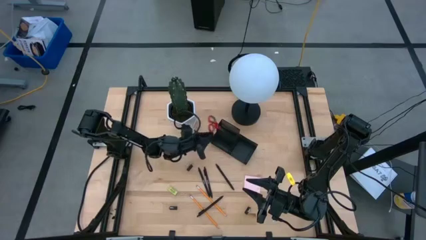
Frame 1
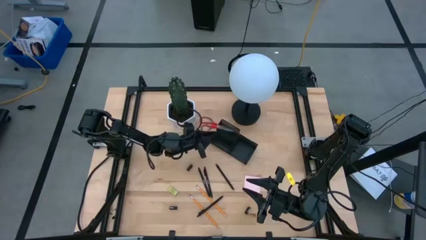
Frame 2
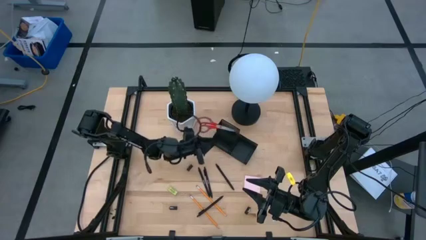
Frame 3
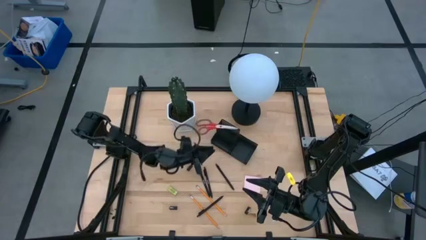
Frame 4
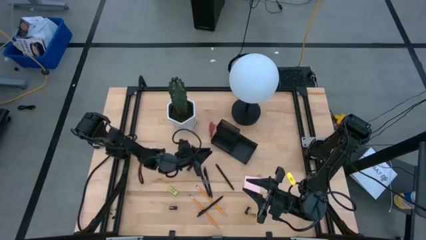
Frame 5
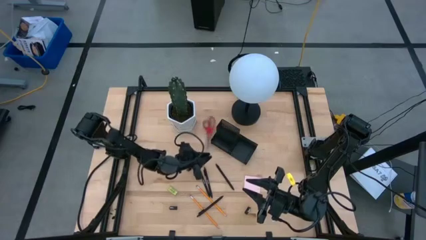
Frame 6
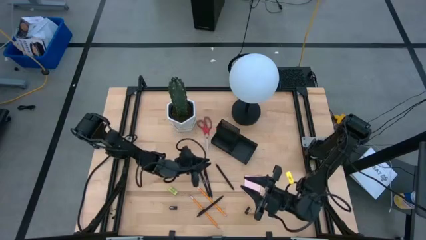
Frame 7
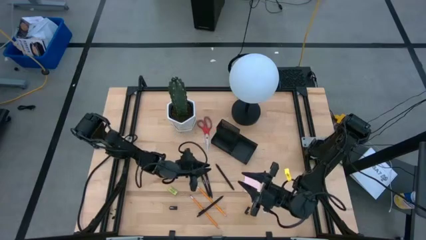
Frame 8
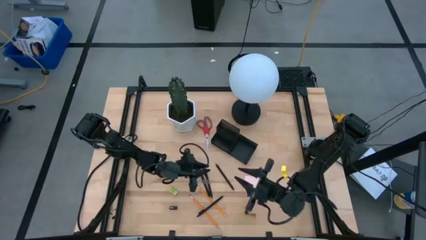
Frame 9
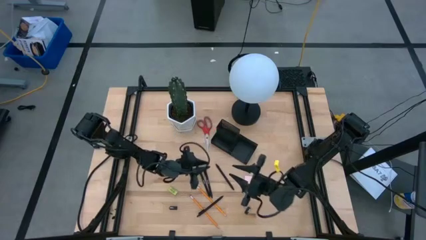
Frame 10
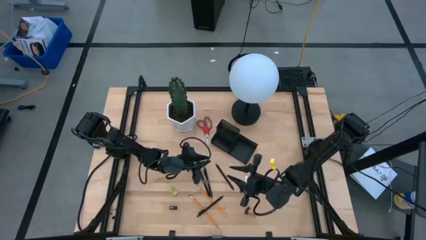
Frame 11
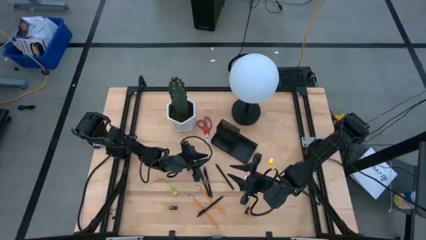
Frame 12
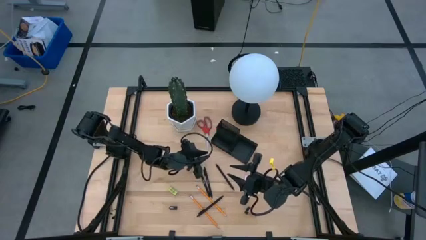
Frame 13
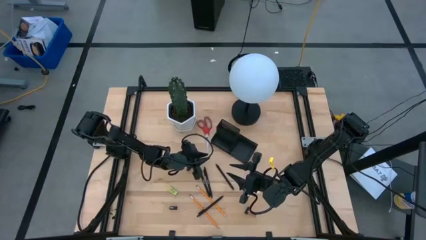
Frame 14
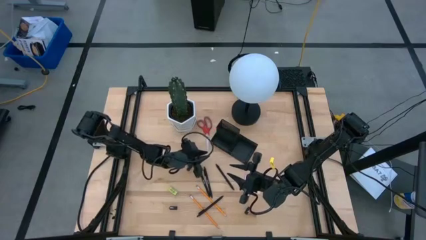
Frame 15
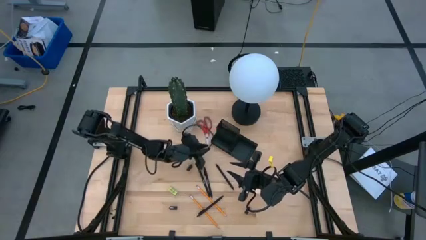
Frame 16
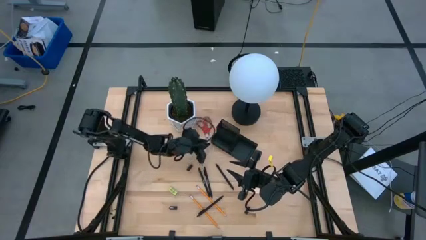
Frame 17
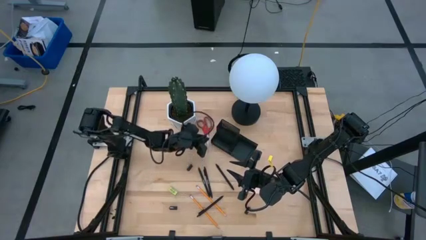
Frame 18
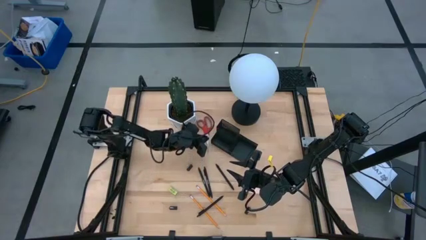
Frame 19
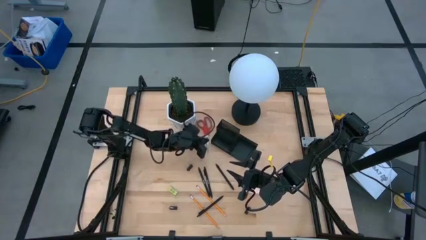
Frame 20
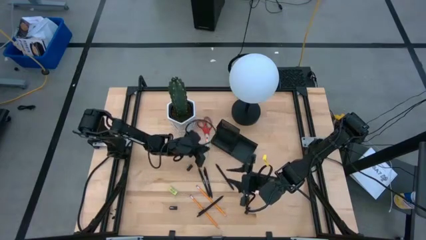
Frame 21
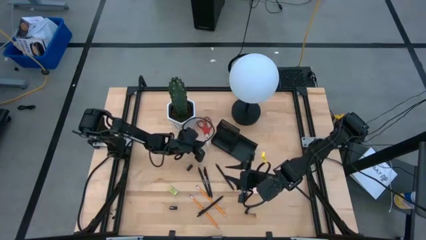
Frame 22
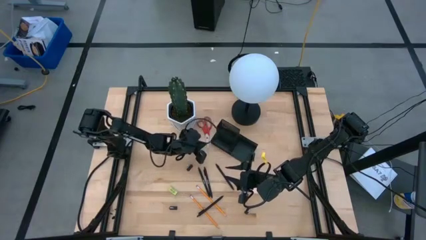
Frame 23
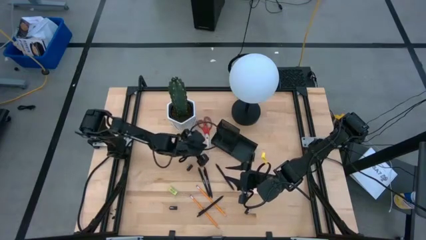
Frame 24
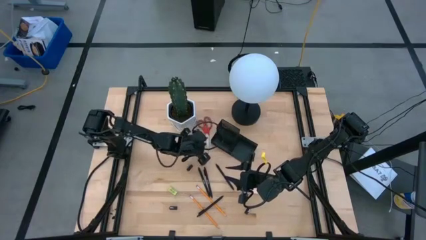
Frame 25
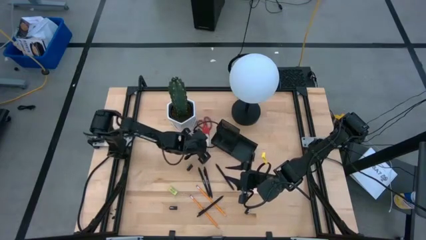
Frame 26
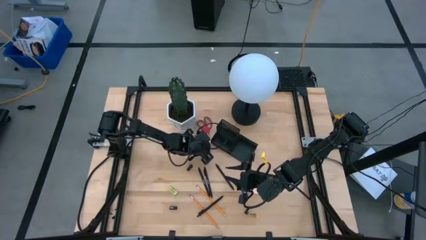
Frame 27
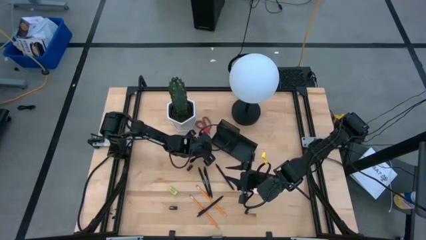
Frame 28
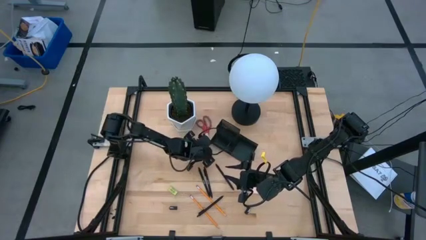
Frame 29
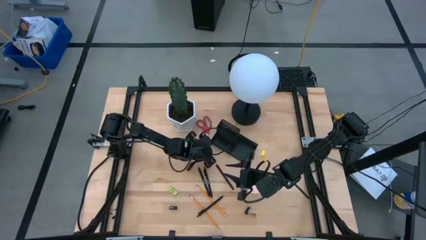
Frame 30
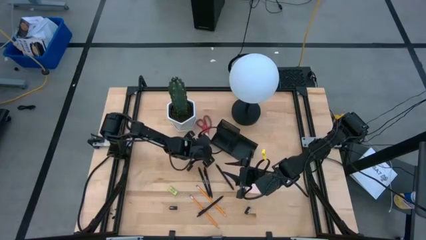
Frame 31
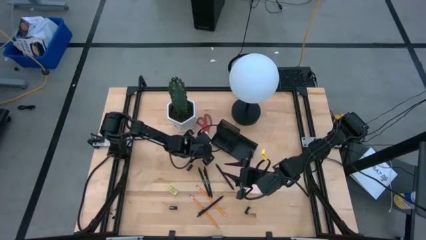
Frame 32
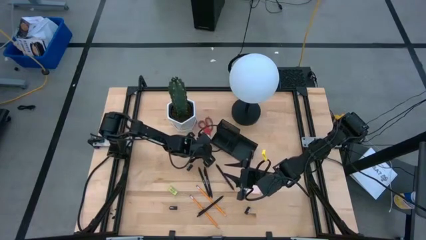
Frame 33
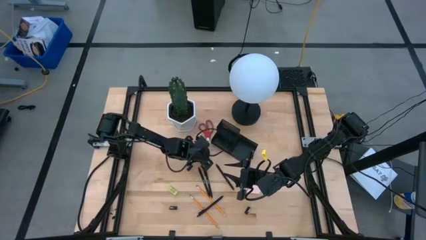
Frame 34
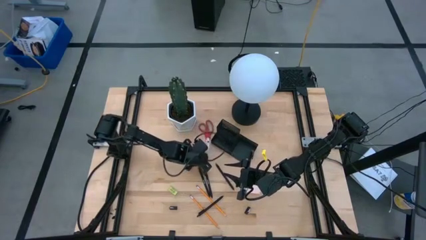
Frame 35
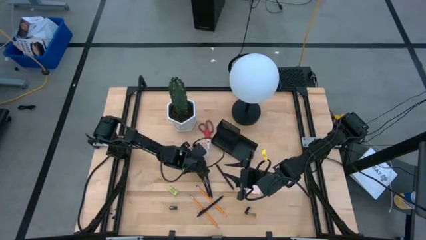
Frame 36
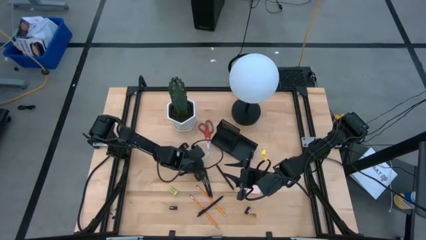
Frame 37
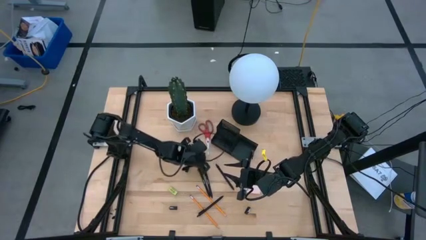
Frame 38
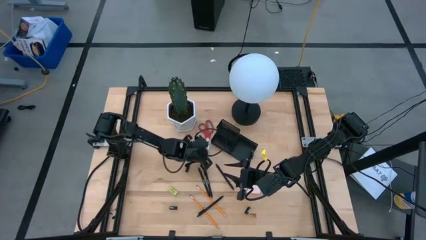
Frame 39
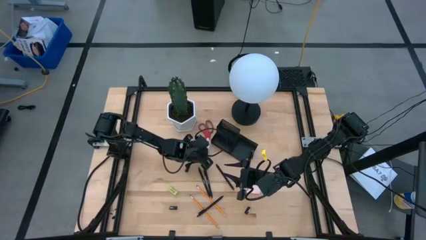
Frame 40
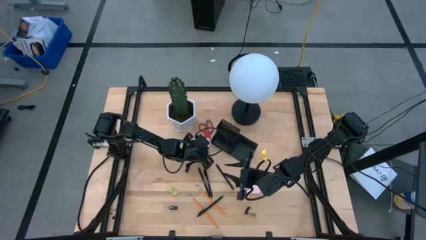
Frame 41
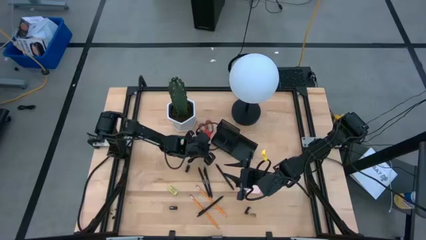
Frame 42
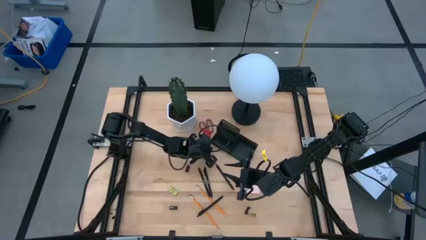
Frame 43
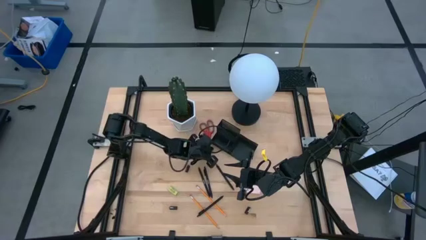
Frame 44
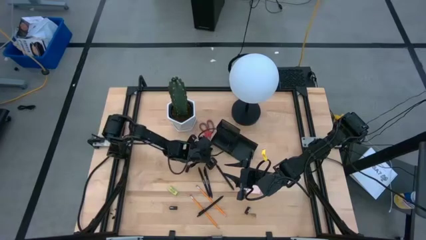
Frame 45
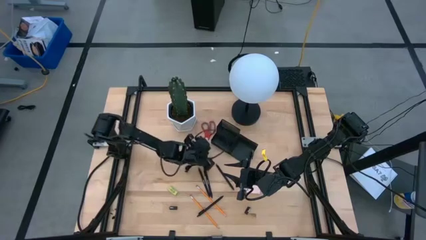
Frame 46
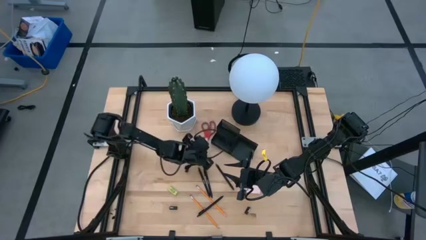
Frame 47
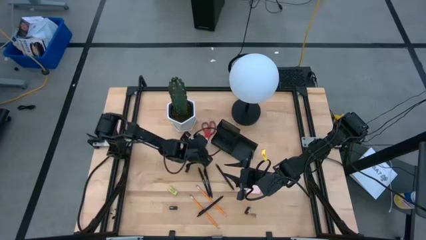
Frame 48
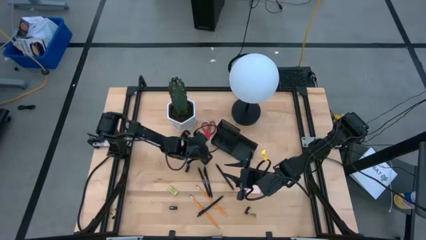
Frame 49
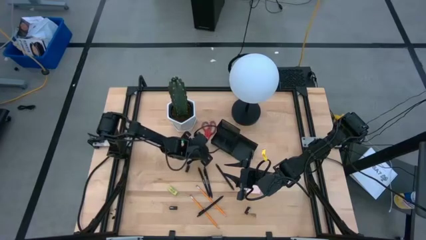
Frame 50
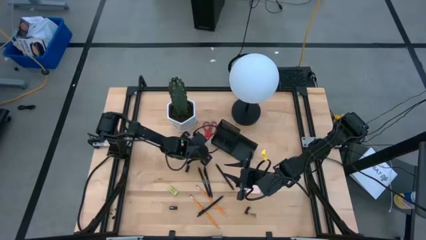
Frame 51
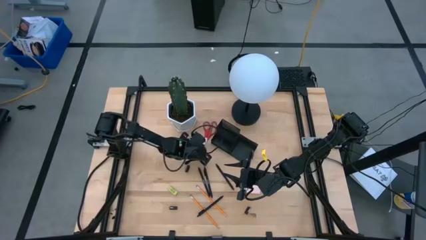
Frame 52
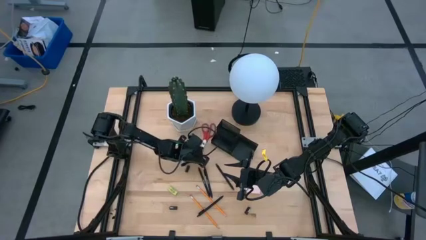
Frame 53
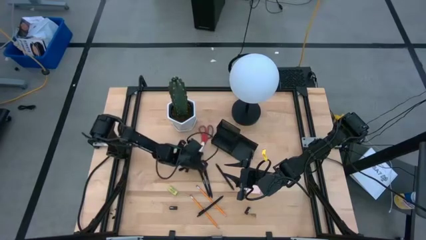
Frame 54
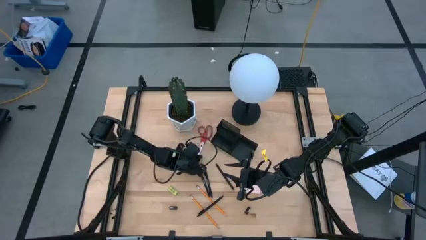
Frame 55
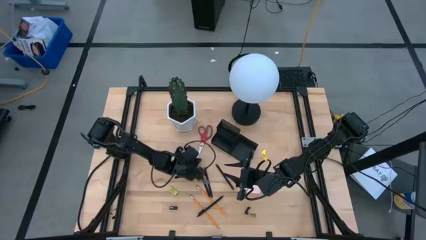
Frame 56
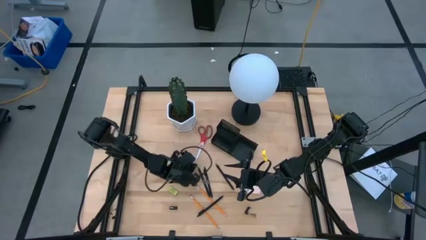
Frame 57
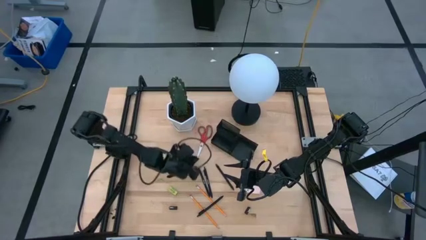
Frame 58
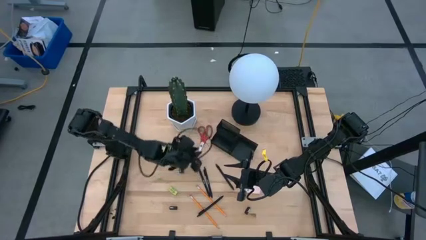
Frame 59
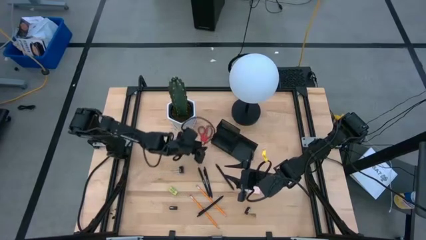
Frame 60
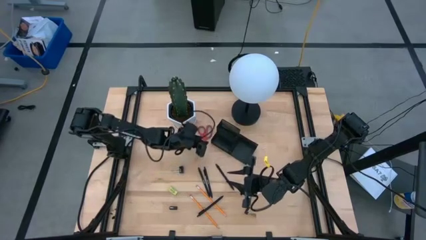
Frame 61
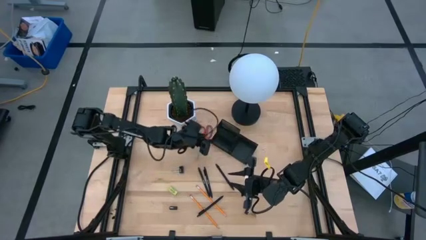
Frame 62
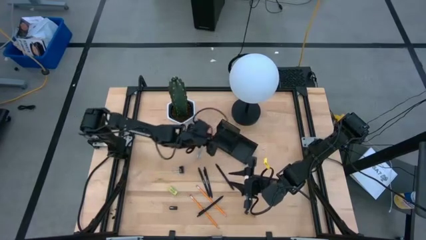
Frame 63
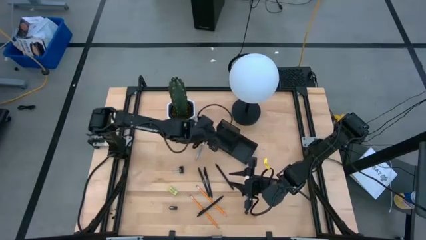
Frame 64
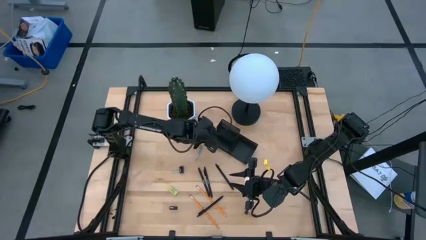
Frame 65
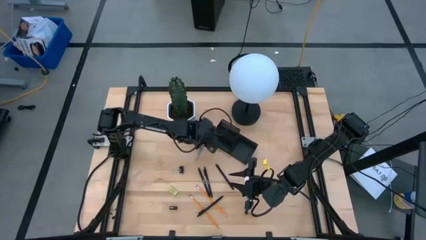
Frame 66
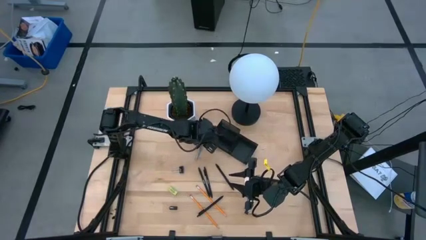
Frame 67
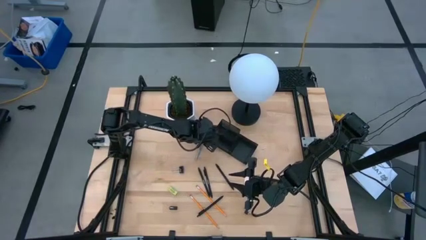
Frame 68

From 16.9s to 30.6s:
Task: Pick and place office supplies into organizer
Put the red scissors into the black desk organizer
